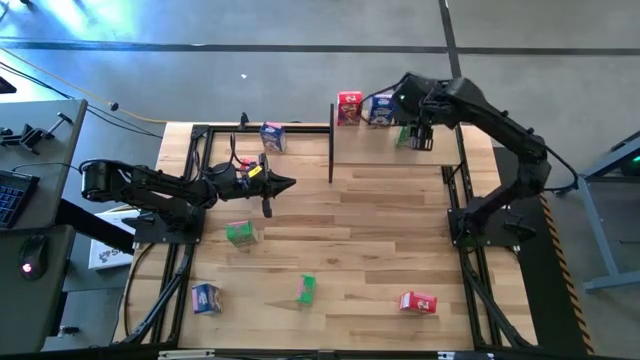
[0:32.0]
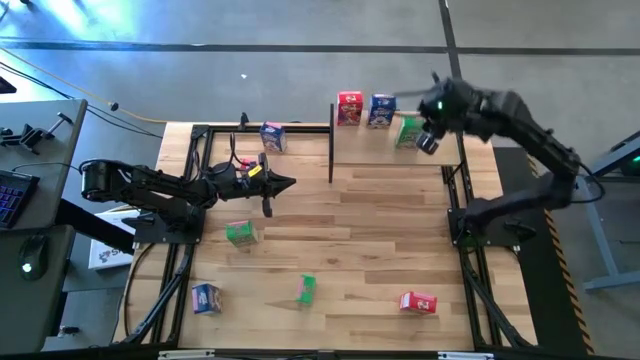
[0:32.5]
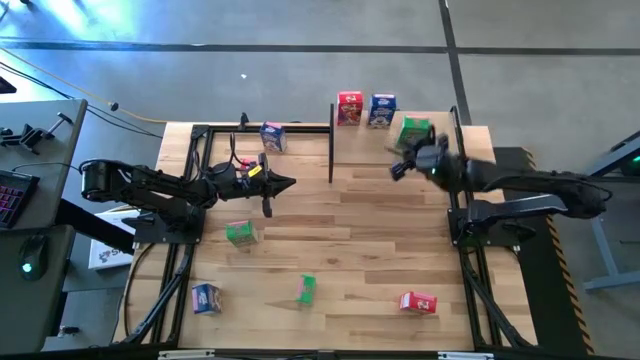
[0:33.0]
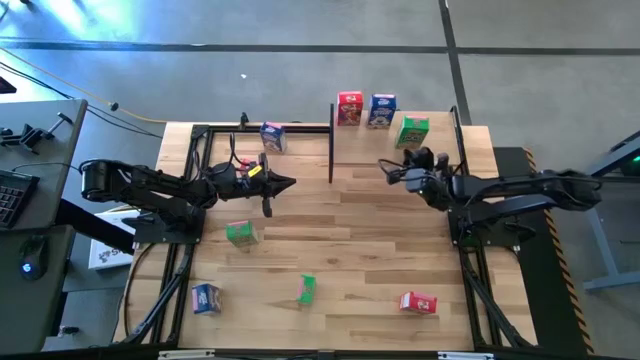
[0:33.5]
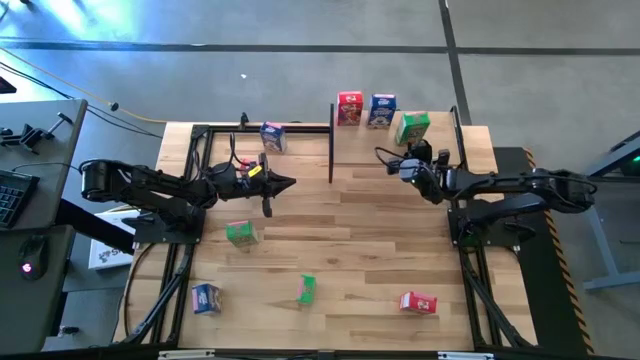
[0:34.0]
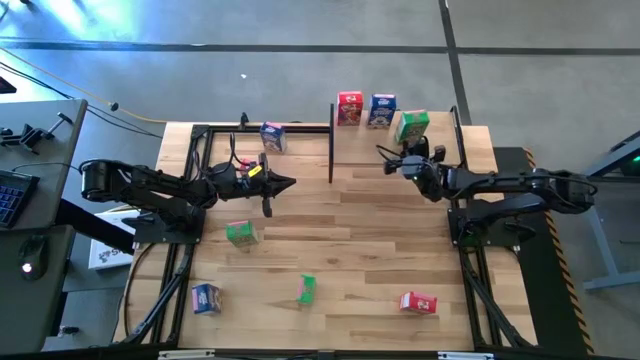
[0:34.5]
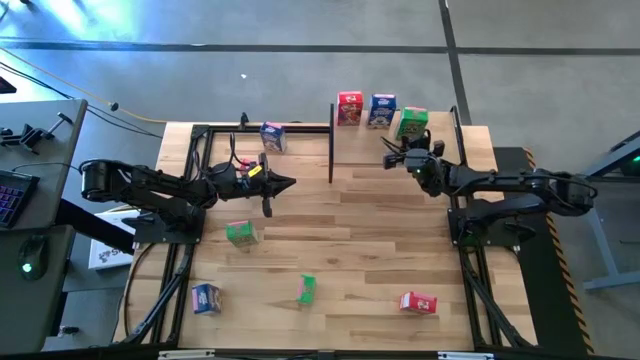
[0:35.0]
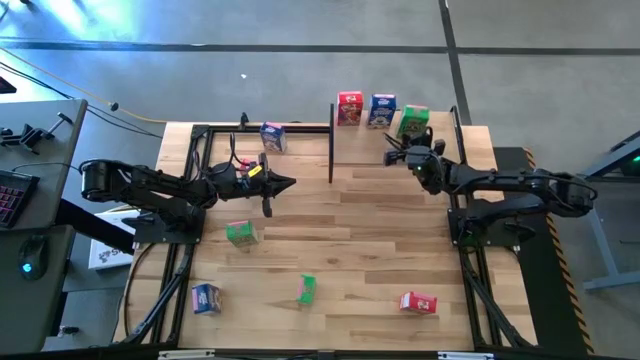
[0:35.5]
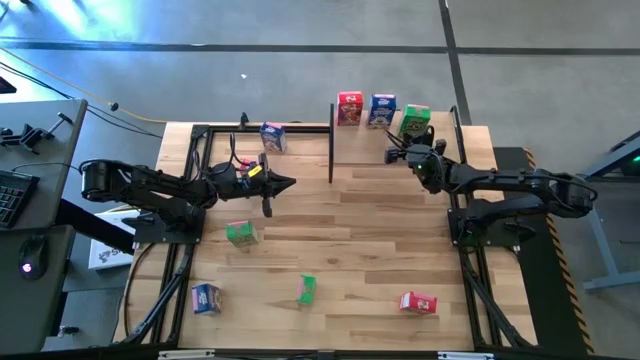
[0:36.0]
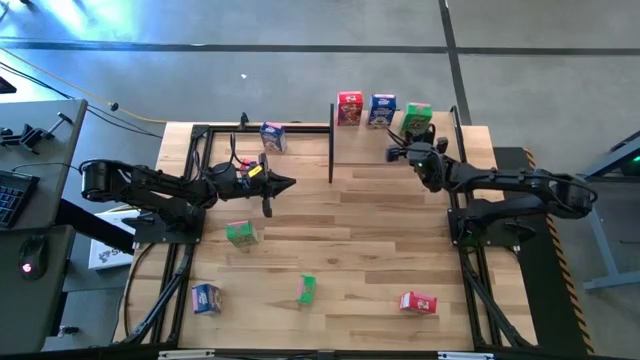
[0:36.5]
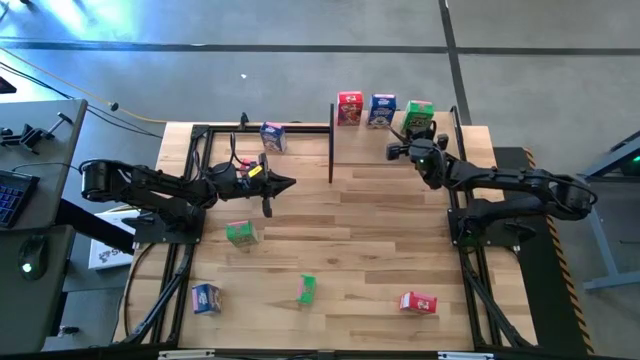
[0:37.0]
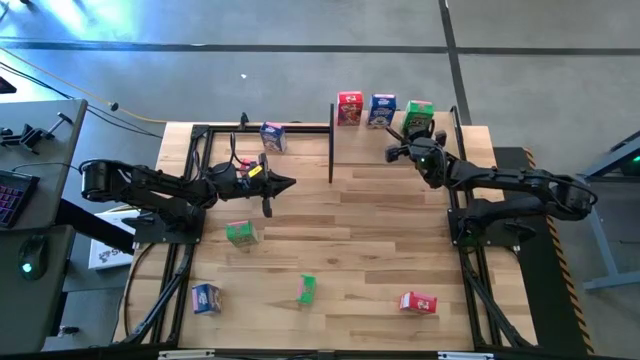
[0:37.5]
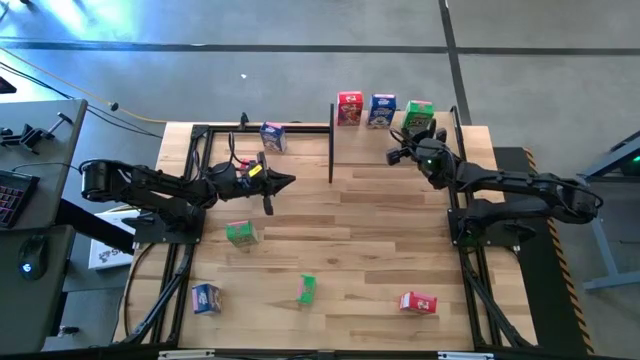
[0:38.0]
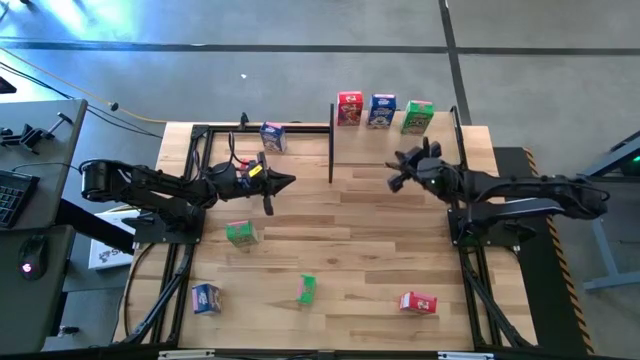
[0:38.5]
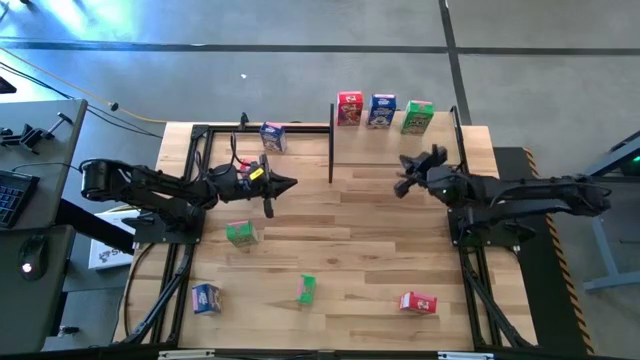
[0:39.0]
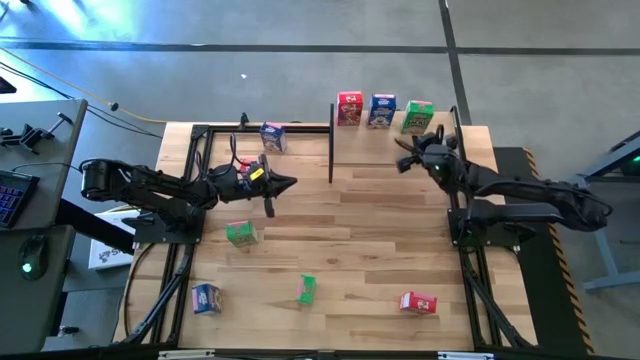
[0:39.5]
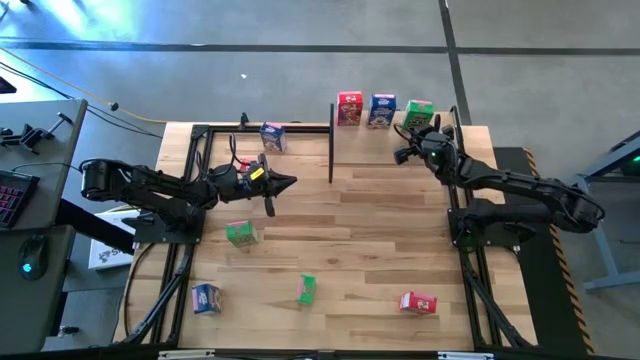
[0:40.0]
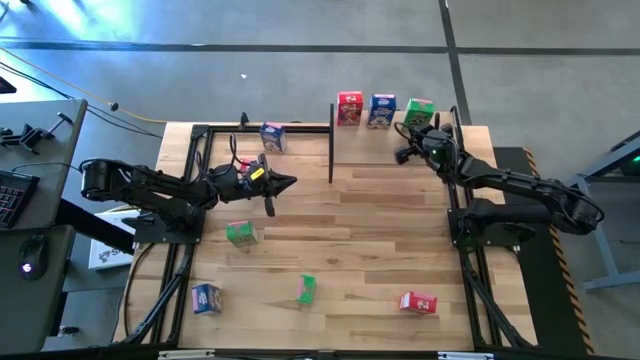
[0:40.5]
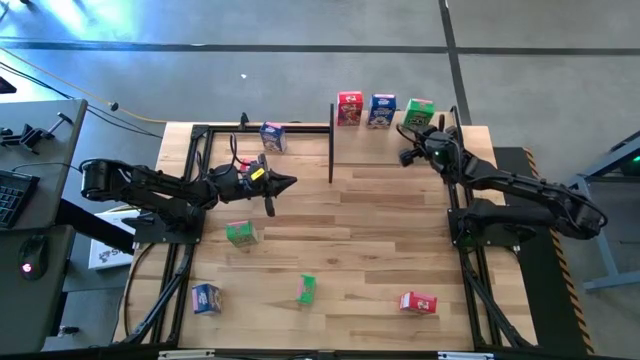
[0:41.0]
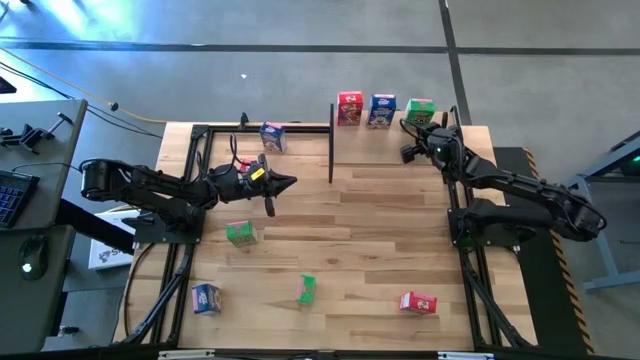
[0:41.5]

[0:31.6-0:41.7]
Task: Stack cereal on shelf
Adjust the green cereal box next to the blue cereal box

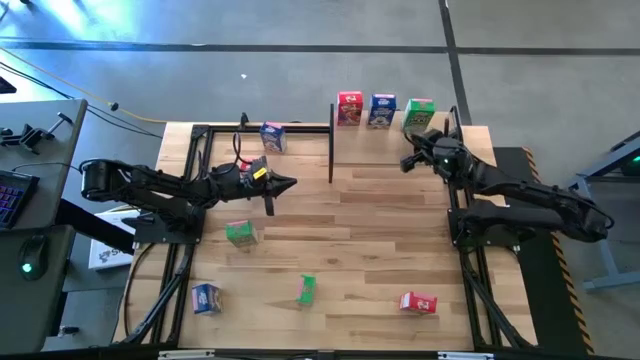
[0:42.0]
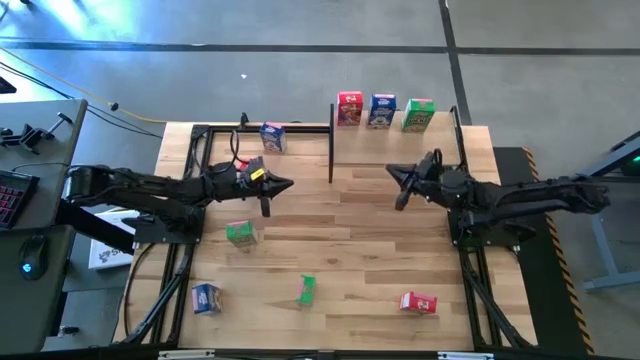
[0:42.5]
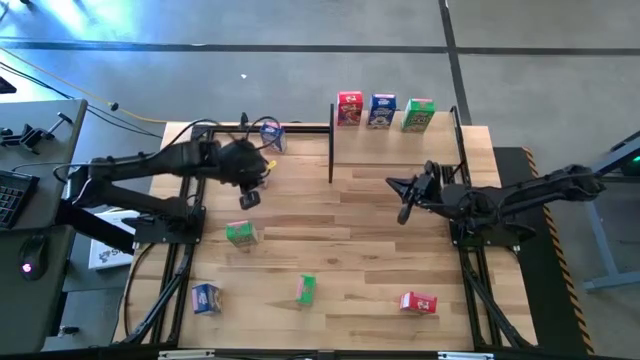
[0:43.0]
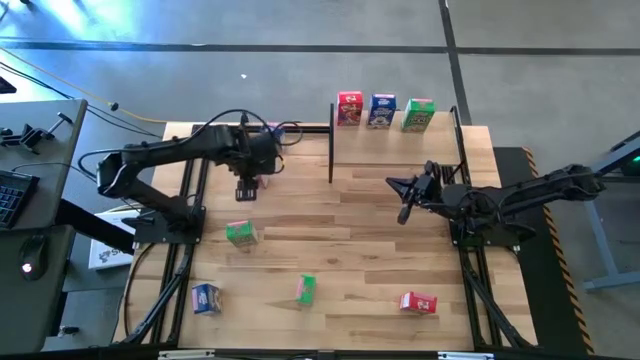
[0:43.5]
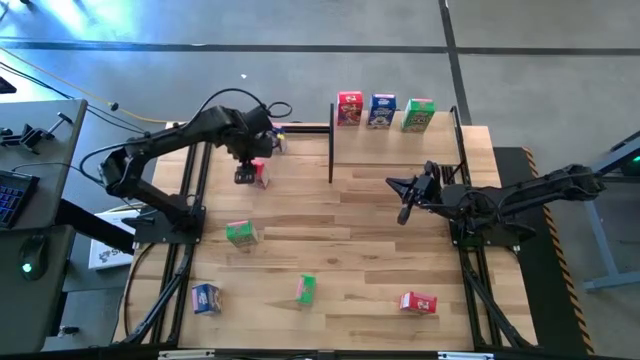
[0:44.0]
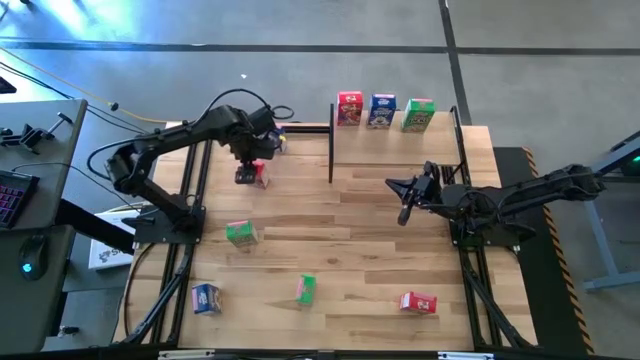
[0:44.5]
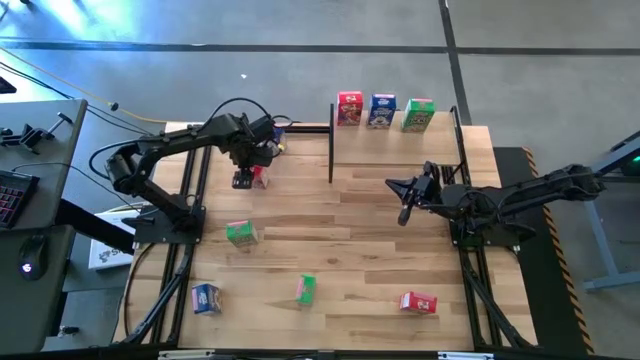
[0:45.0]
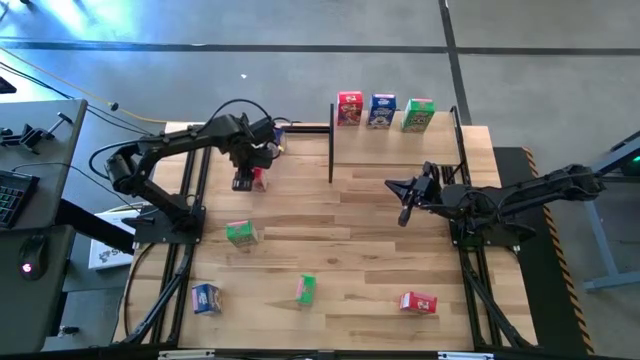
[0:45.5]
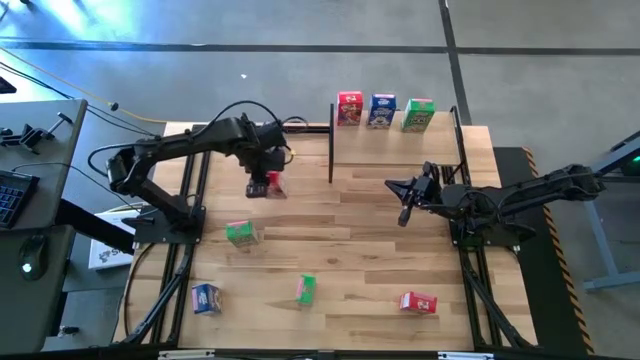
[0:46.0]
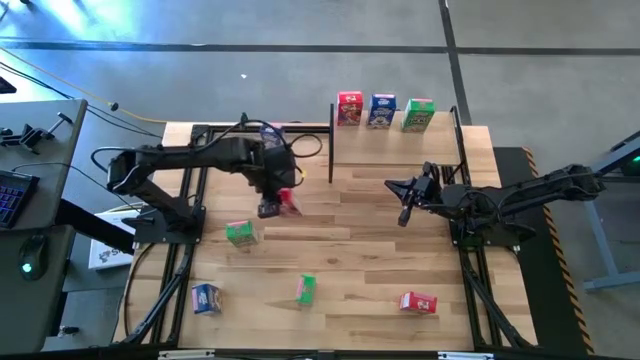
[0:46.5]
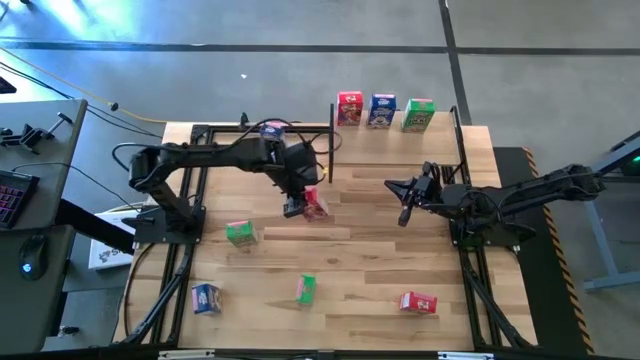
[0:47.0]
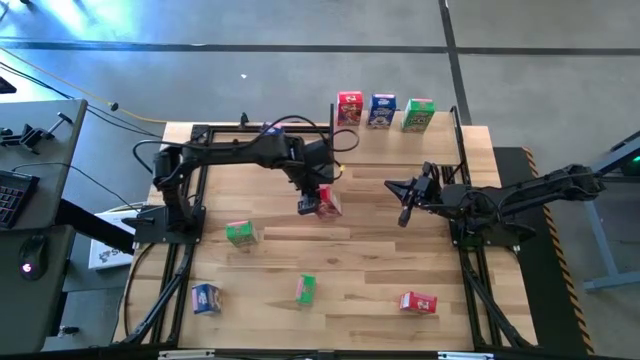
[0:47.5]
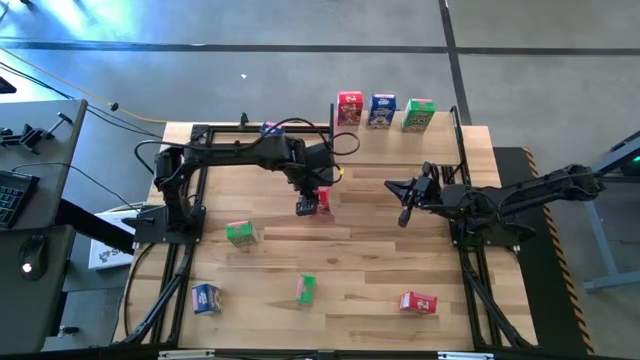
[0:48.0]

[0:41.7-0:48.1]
Move the cereal box to the center of the table

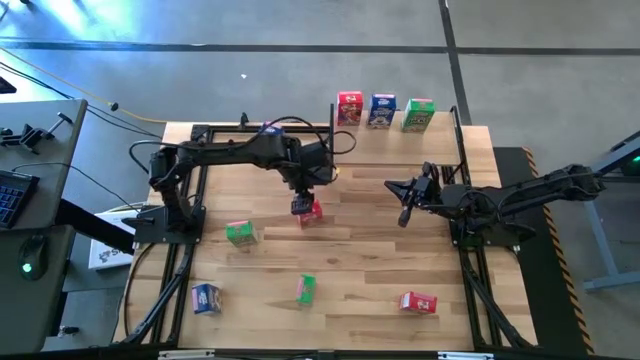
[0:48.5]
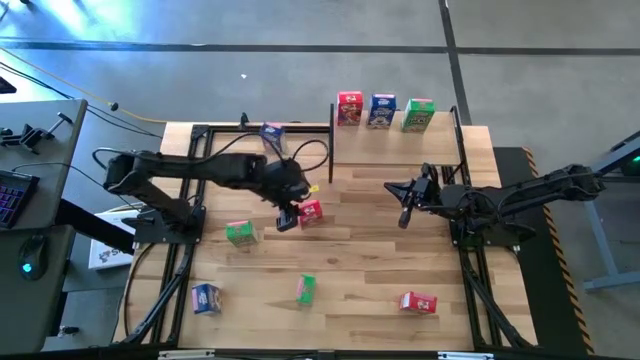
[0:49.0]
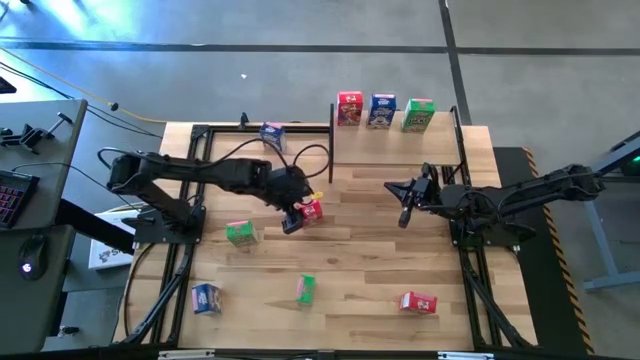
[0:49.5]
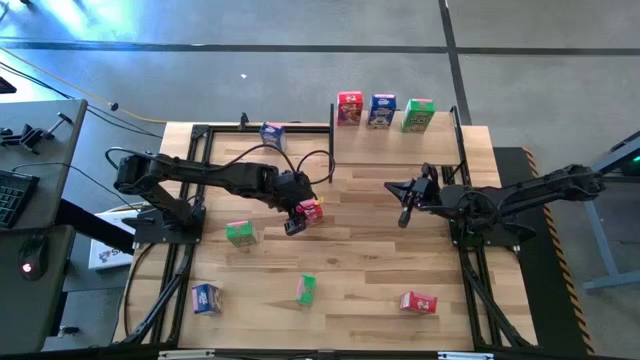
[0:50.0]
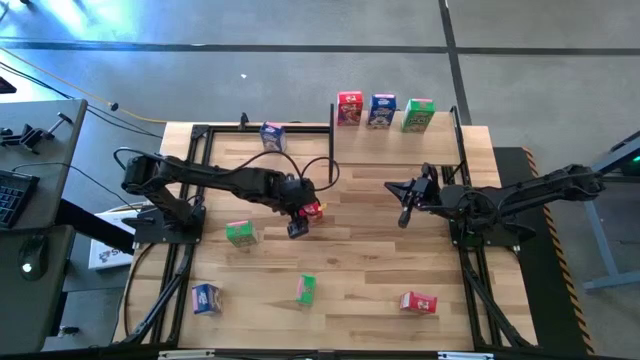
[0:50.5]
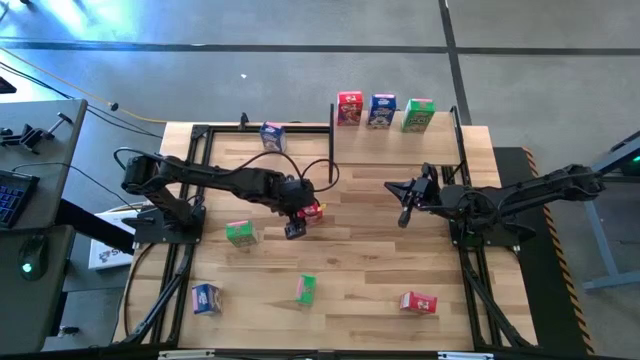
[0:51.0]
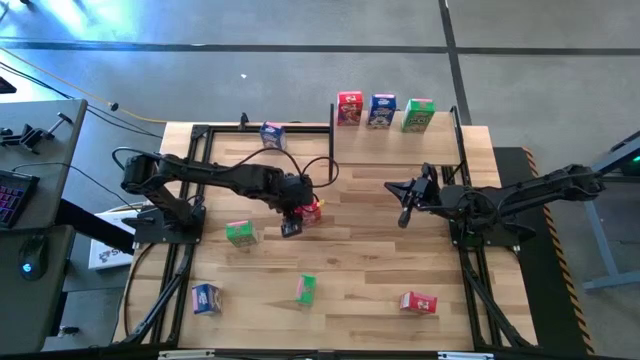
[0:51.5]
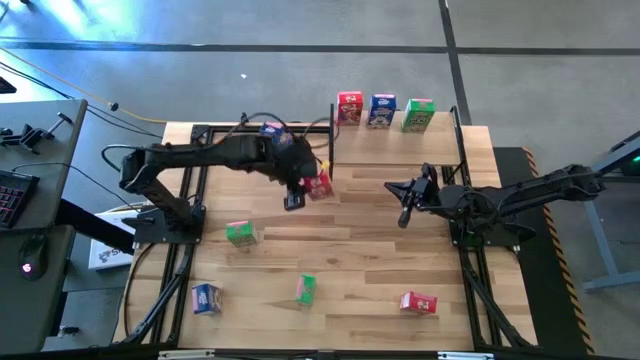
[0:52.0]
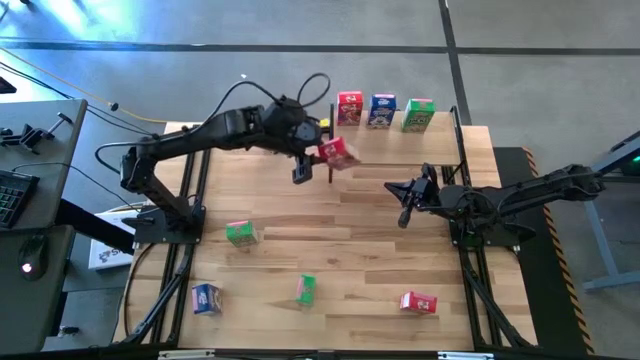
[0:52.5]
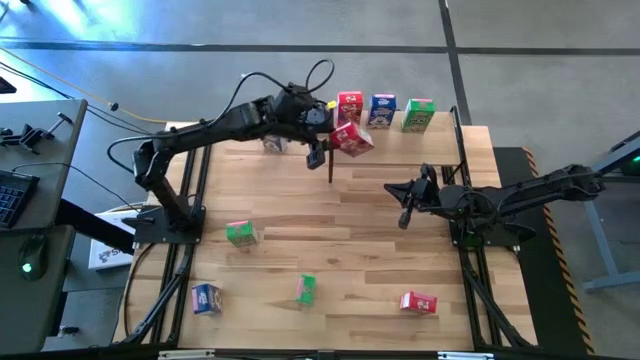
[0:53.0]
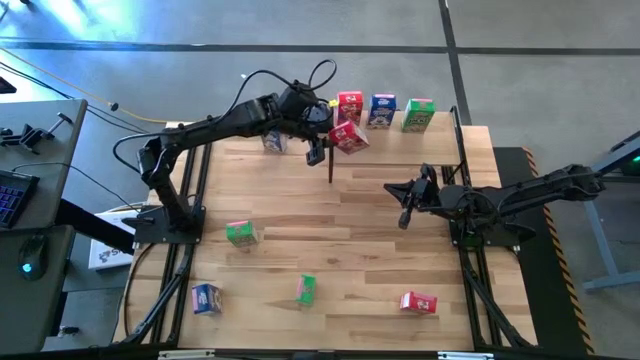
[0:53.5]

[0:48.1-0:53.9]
Put the top red cereal box on the shelf and aligned with the other red cereal box
